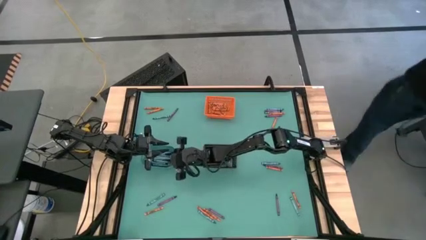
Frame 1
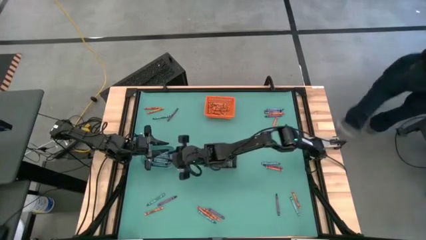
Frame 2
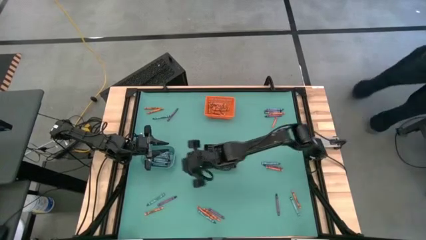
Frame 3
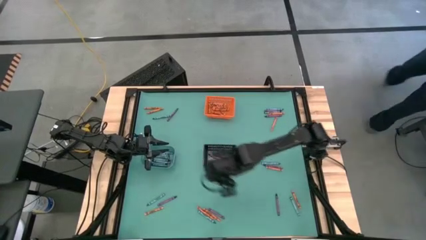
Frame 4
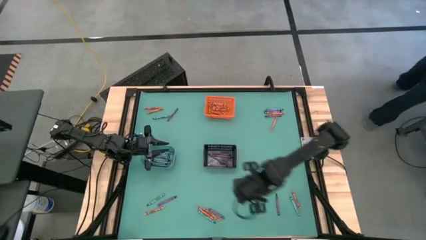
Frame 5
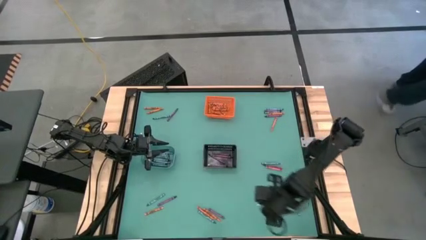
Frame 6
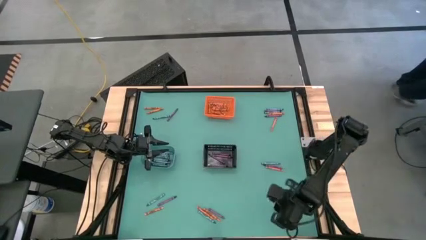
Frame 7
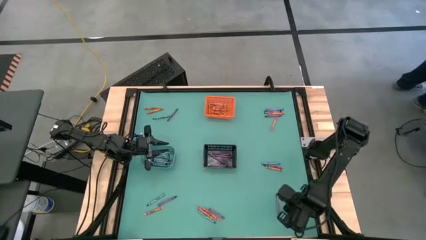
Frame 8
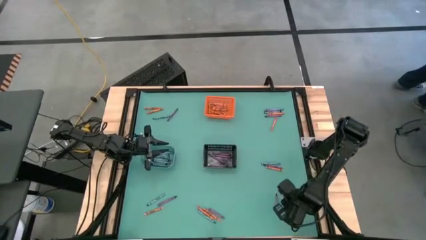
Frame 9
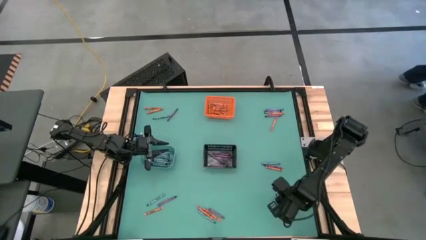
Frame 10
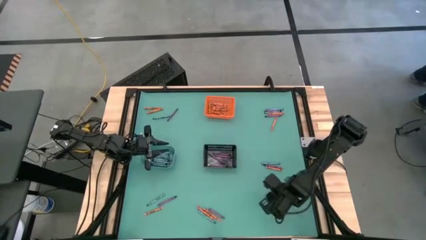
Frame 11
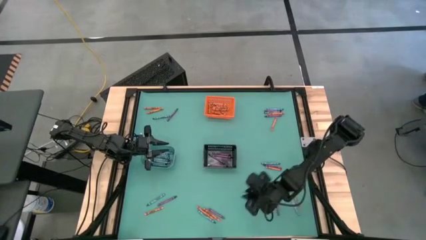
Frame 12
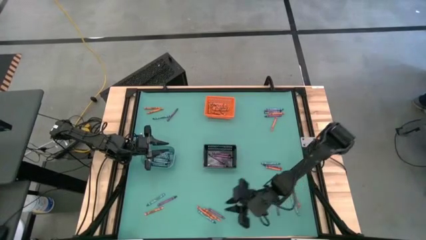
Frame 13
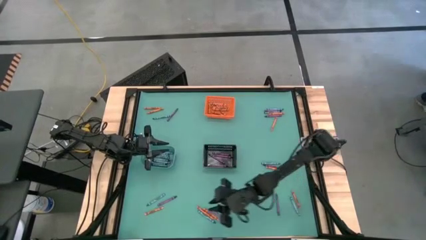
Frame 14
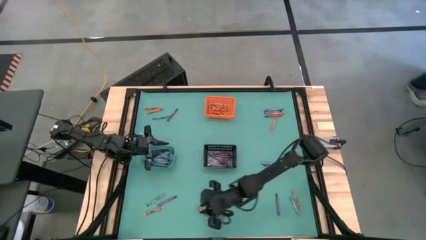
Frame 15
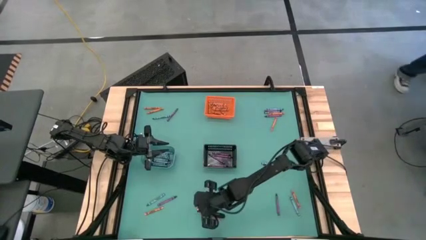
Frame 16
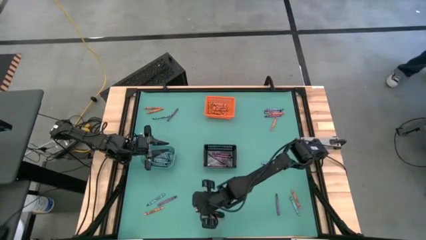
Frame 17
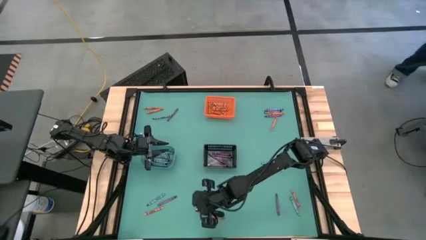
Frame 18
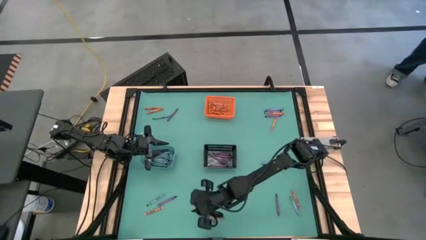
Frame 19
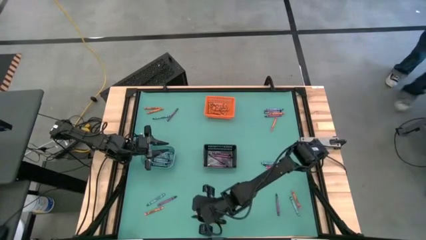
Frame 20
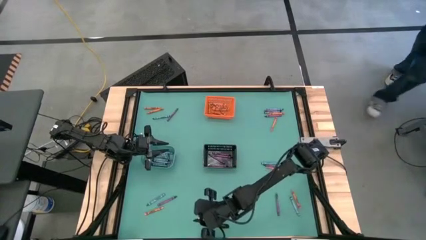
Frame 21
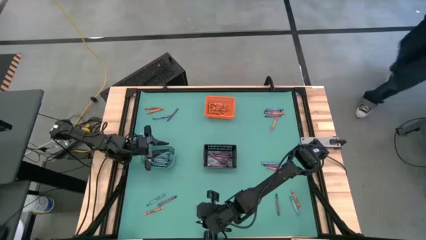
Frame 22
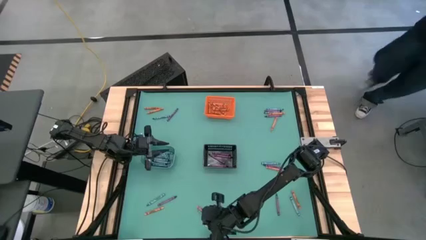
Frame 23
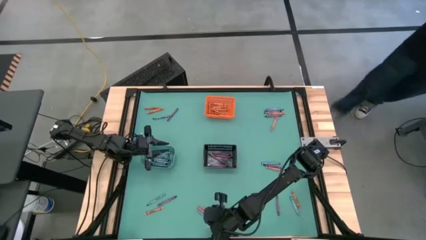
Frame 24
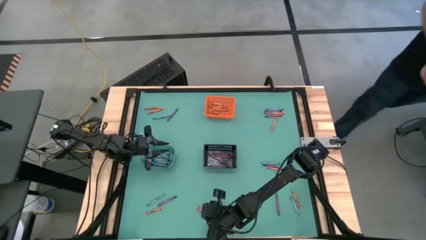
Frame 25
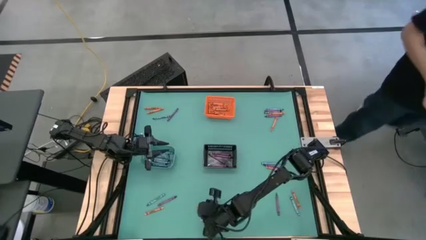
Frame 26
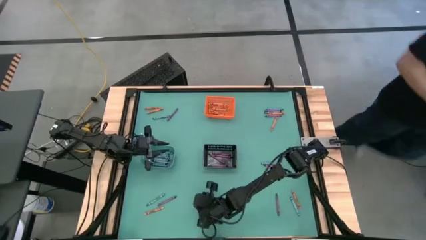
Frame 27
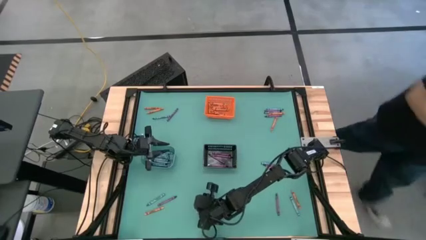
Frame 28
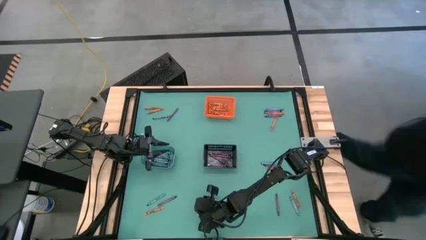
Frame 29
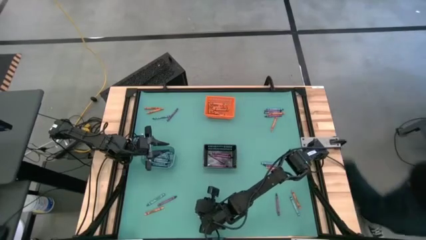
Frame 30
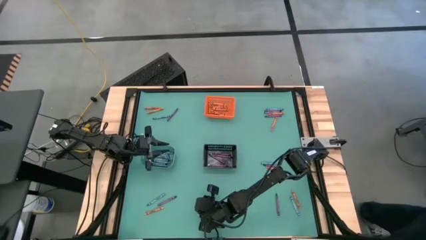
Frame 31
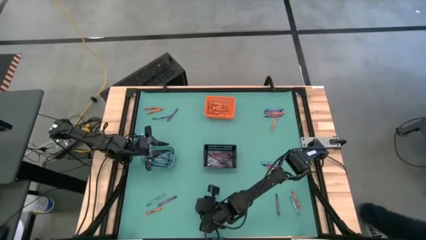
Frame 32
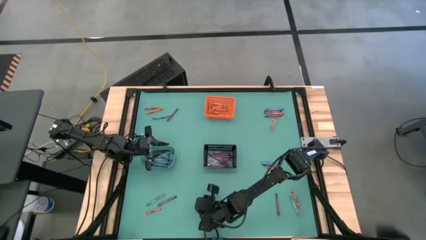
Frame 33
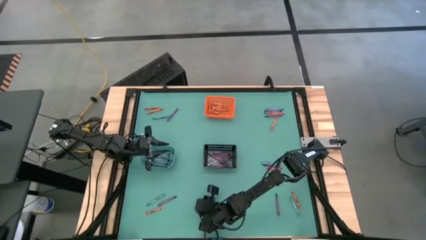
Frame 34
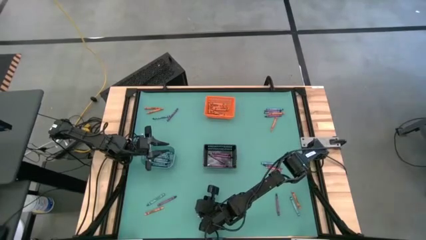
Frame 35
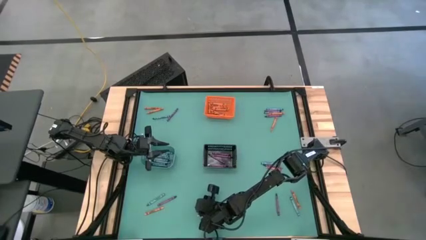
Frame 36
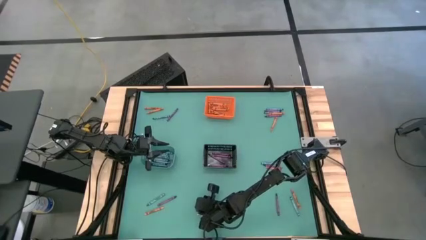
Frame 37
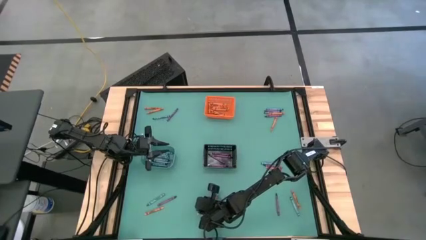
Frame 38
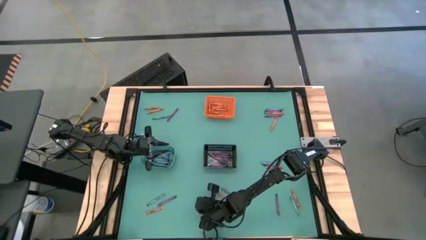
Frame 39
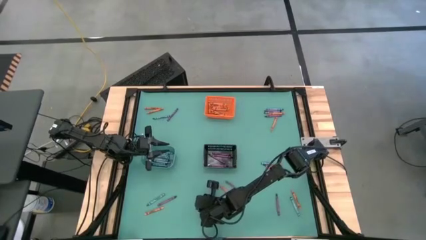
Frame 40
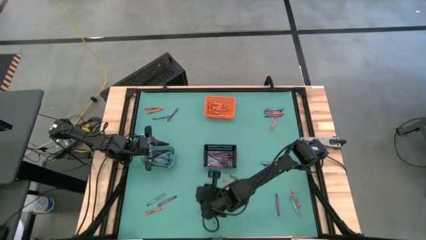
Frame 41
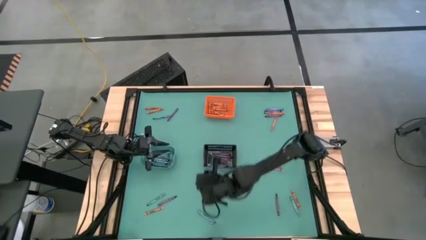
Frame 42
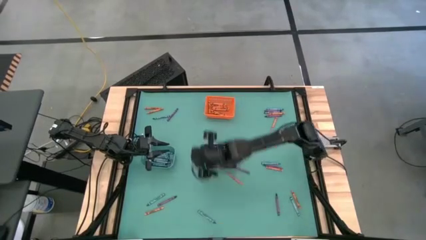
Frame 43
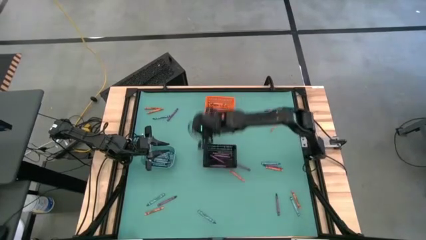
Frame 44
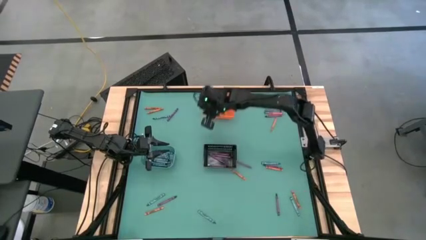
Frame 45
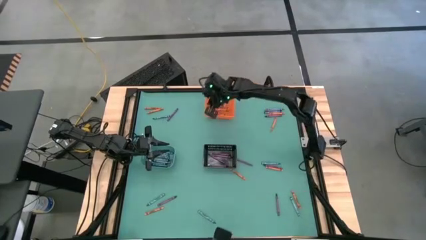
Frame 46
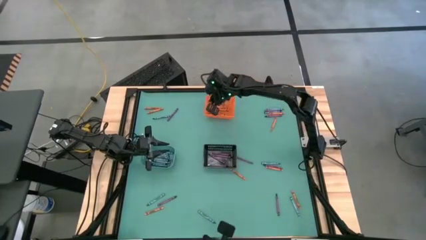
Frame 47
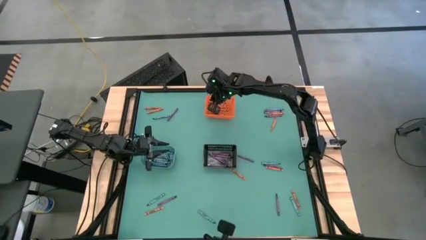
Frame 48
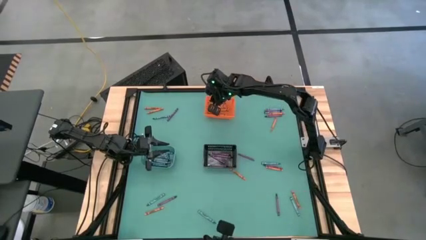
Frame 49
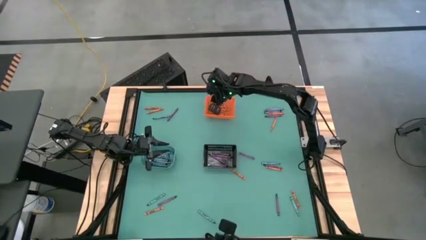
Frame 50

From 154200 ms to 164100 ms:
Task: Sort crayons
Put the orange crayon into the orange bin

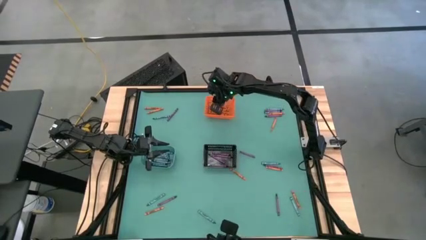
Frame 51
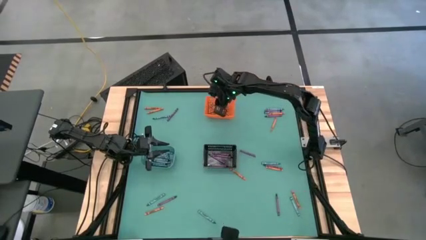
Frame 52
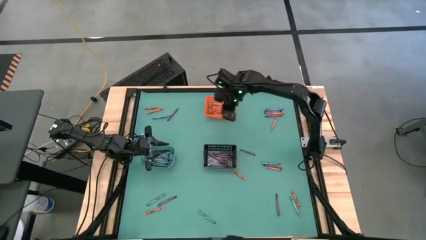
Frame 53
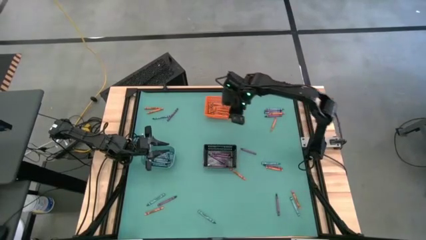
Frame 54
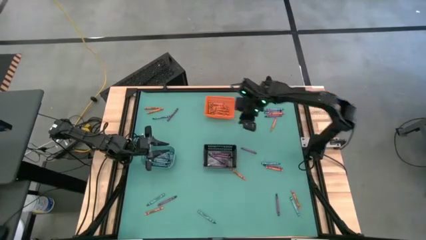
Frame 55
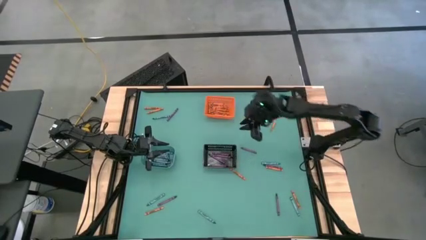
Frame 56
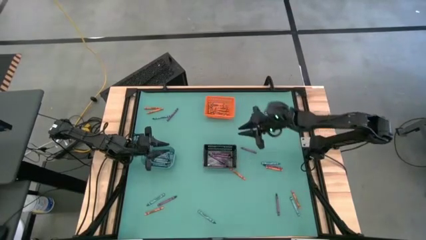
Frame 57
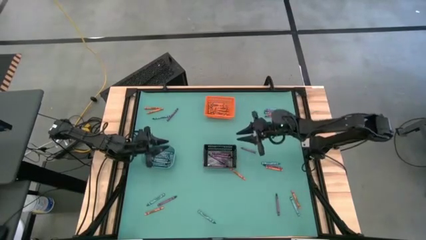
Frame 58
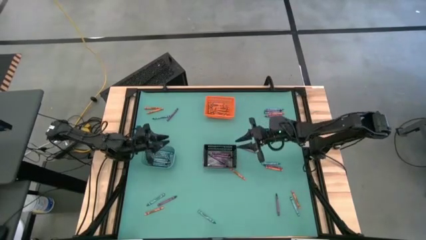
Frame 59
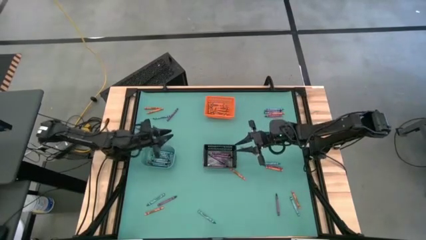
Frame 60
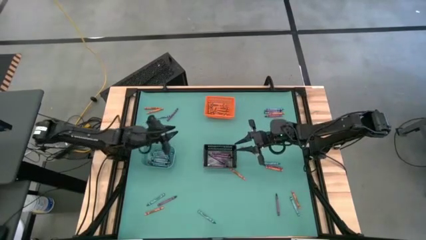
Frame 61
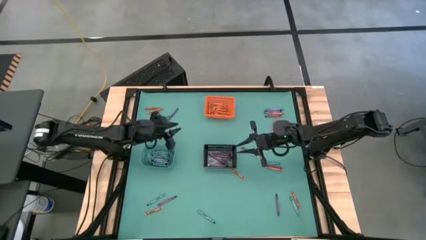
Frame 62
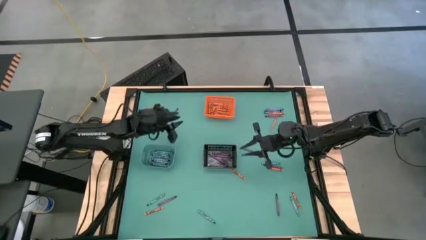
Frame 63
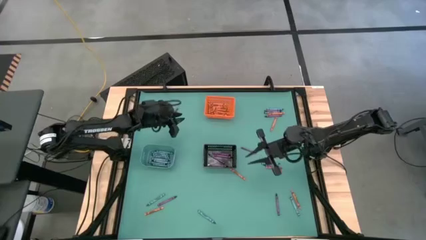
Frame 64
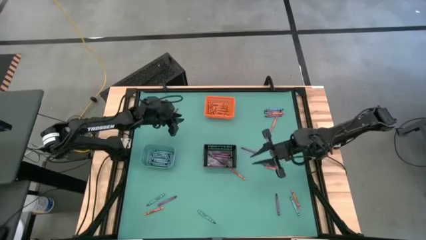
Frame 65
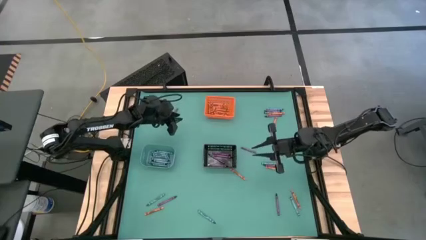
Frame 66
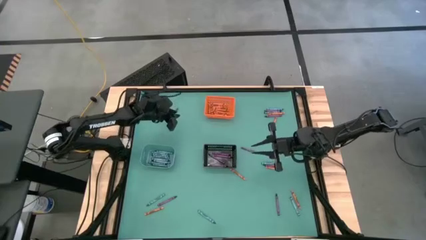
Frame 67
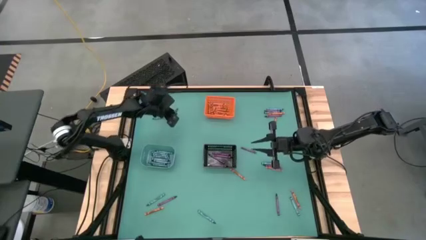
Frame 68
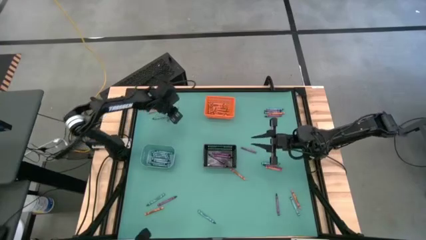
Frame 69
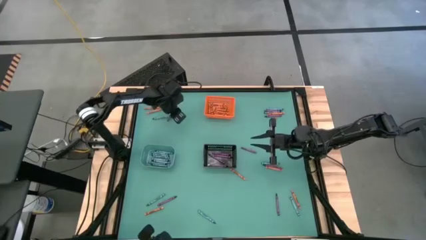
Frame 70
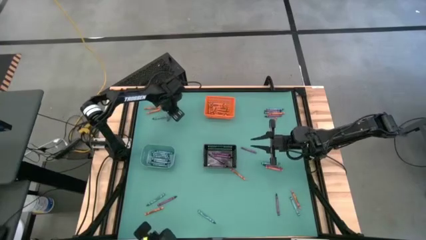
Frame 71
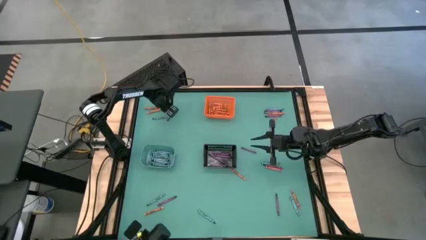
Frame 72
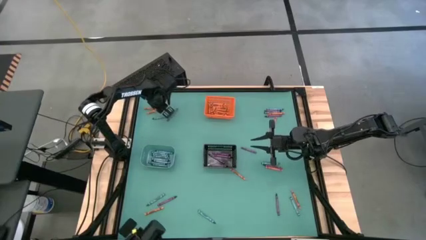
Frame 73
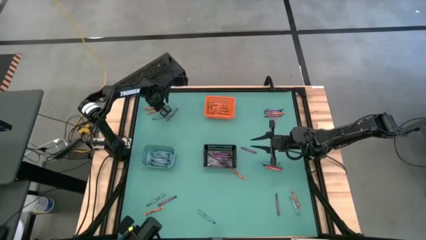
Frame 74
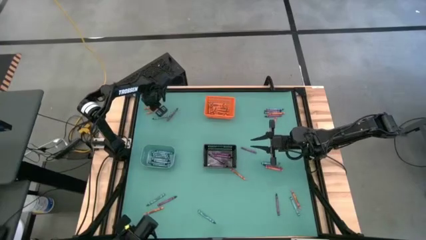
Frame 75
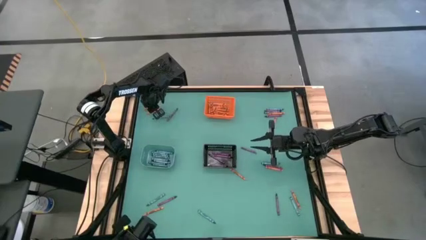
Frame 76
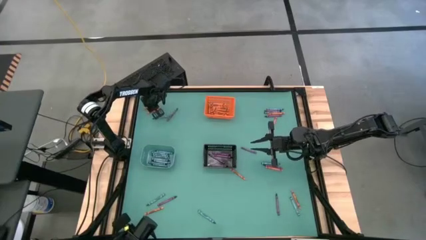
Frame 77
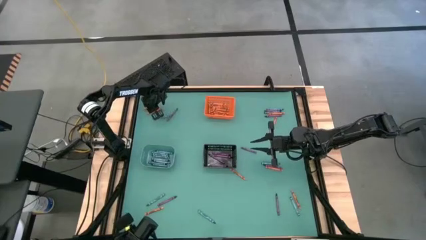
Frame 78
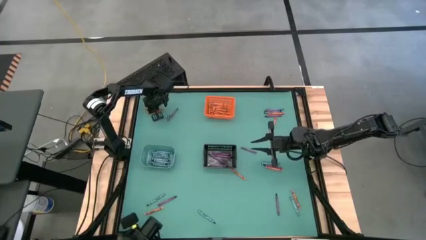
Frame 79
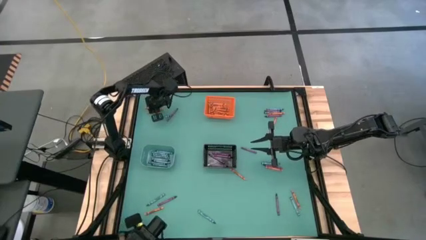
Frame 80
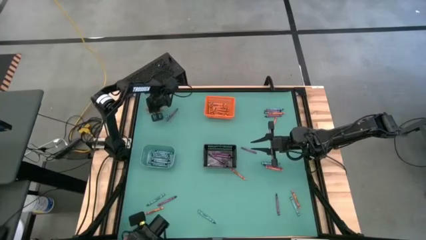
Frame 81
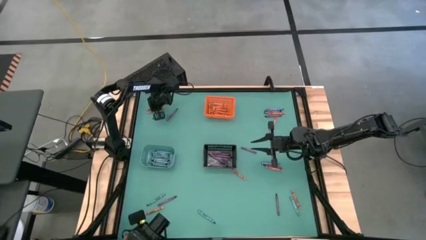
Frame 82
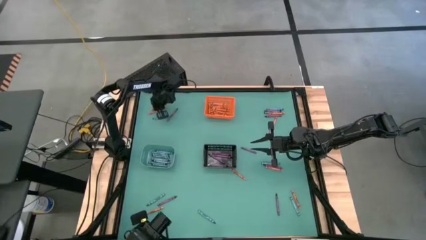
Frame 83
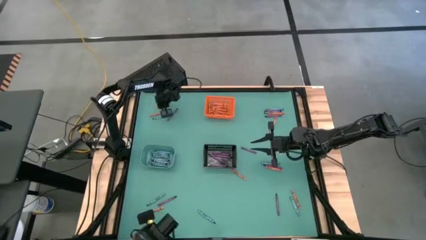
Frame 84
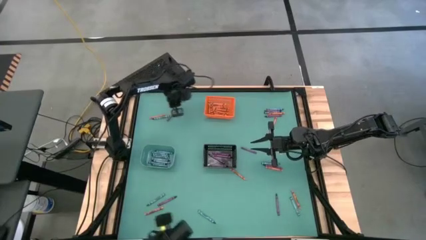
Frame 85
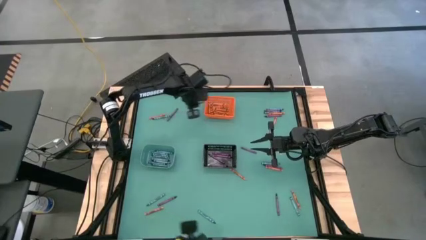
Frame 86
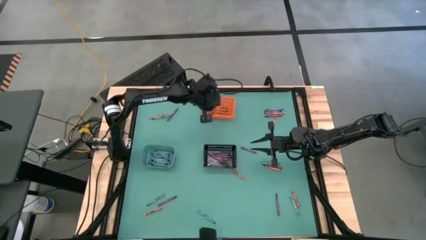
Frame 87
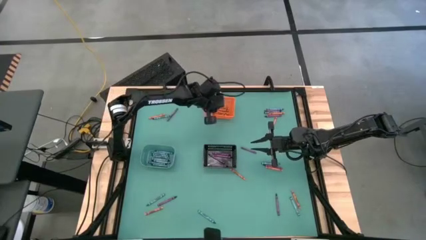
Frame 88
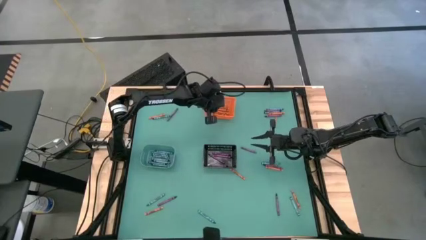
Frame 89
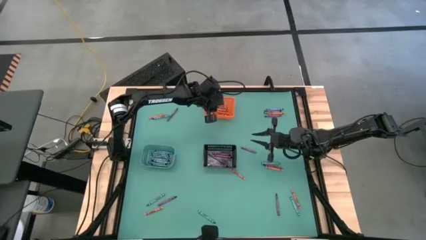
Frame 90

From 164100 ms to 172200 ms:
Put the orange crayon into the orange bin
